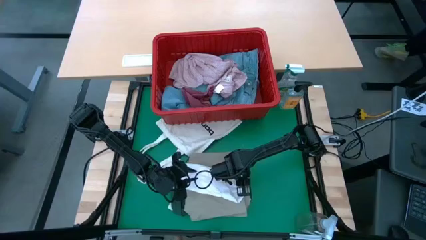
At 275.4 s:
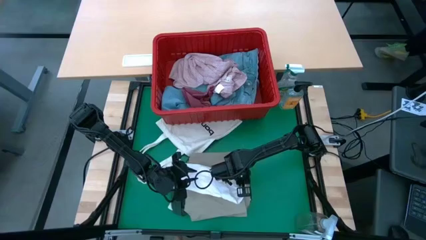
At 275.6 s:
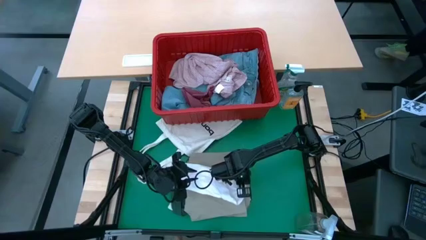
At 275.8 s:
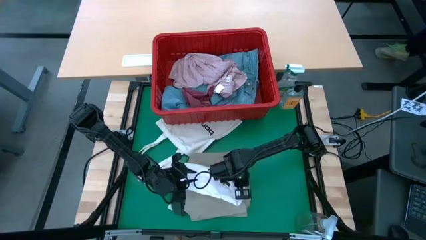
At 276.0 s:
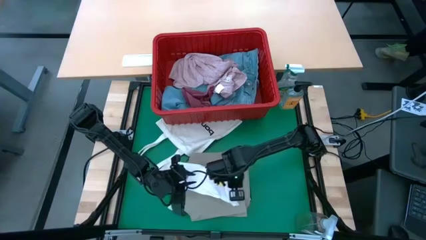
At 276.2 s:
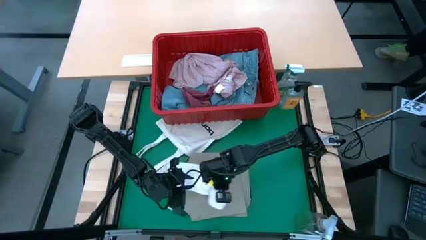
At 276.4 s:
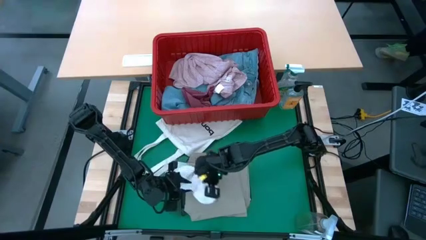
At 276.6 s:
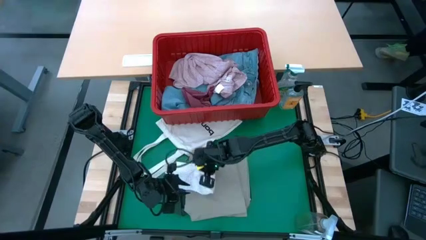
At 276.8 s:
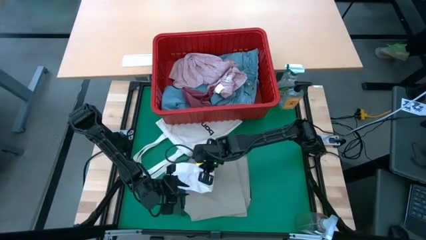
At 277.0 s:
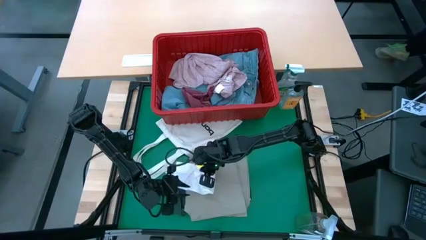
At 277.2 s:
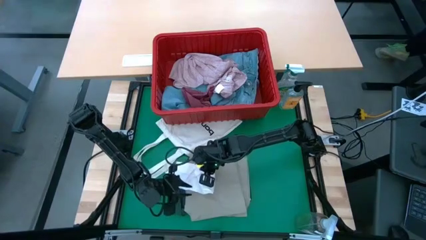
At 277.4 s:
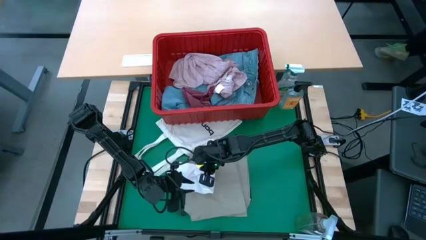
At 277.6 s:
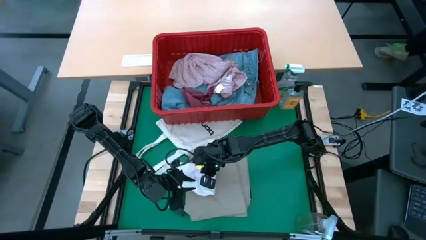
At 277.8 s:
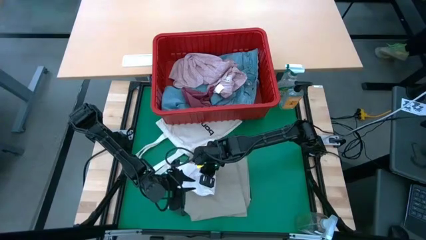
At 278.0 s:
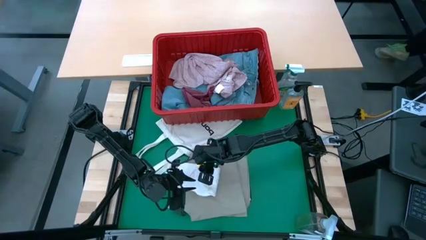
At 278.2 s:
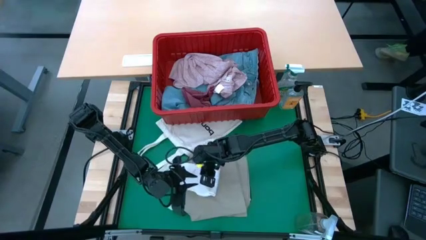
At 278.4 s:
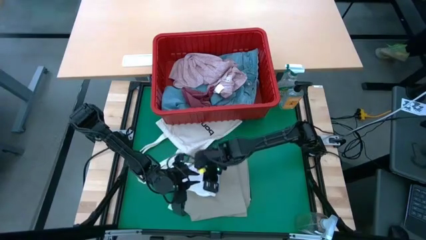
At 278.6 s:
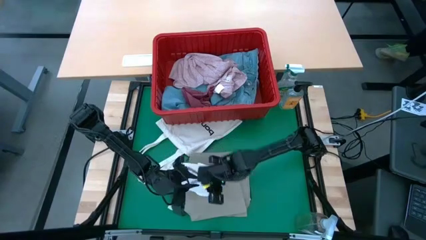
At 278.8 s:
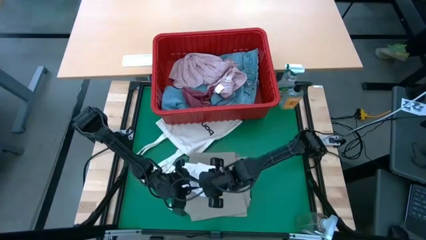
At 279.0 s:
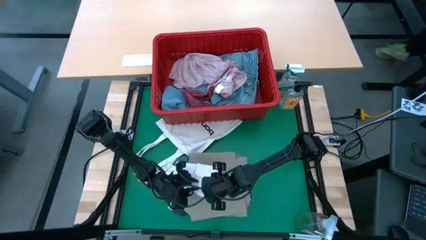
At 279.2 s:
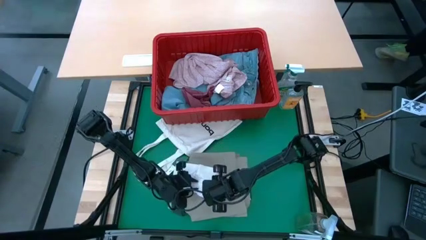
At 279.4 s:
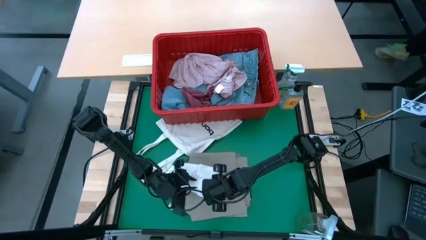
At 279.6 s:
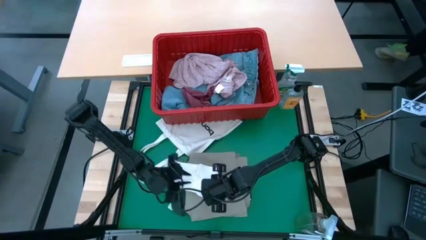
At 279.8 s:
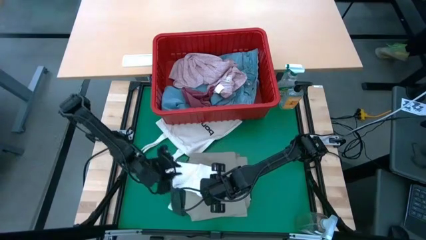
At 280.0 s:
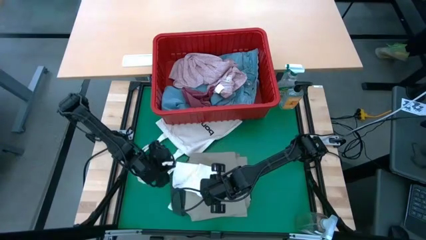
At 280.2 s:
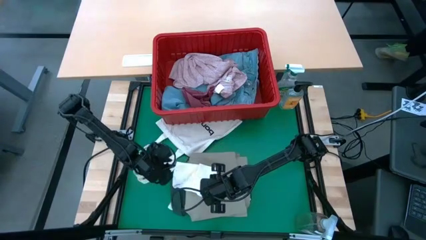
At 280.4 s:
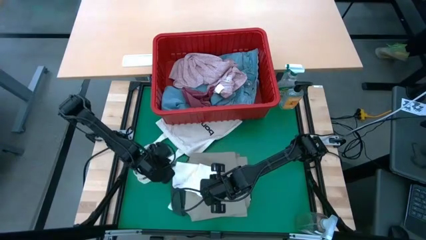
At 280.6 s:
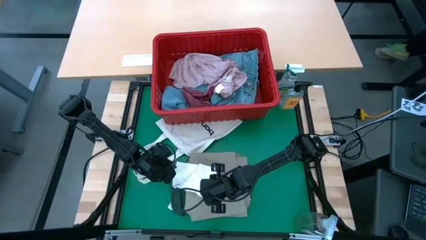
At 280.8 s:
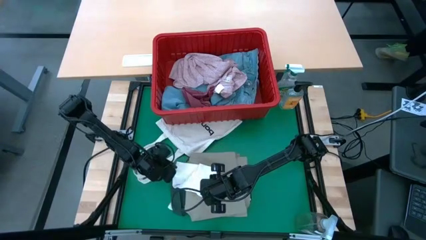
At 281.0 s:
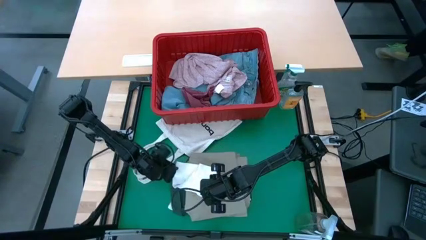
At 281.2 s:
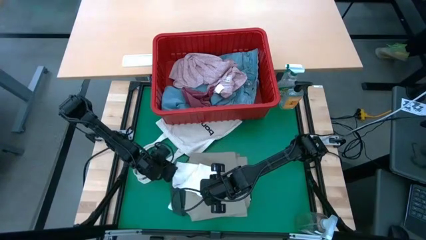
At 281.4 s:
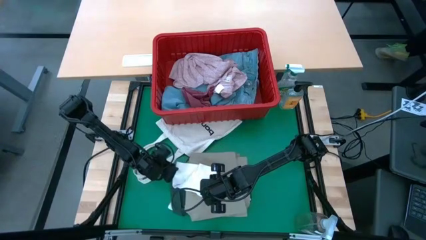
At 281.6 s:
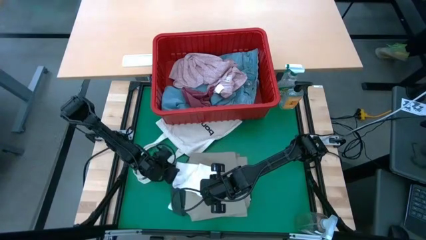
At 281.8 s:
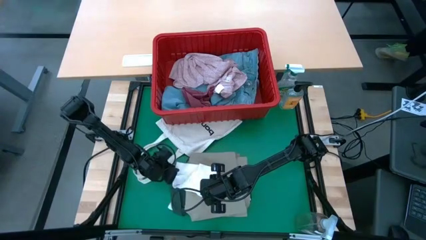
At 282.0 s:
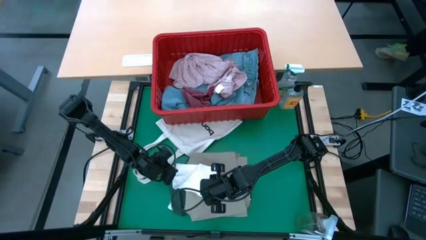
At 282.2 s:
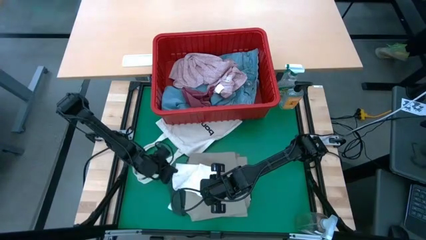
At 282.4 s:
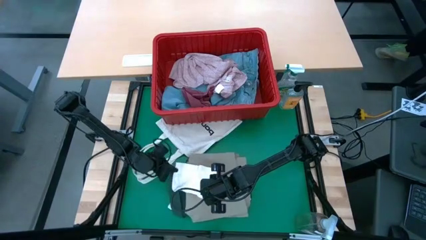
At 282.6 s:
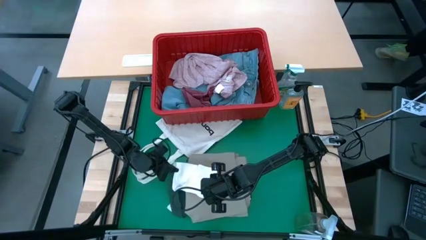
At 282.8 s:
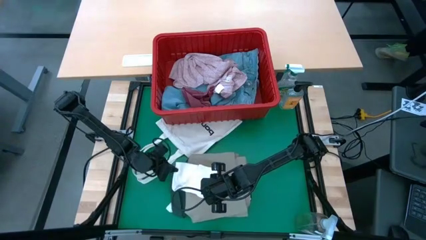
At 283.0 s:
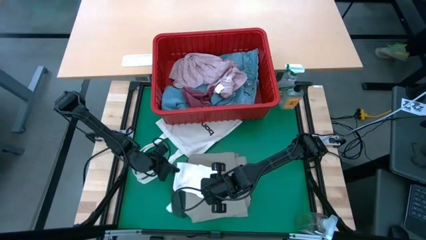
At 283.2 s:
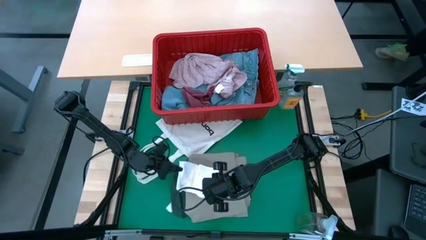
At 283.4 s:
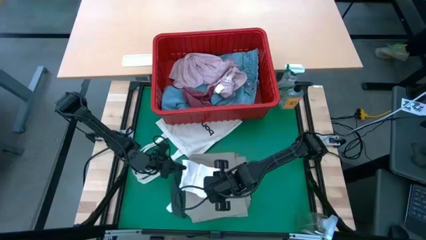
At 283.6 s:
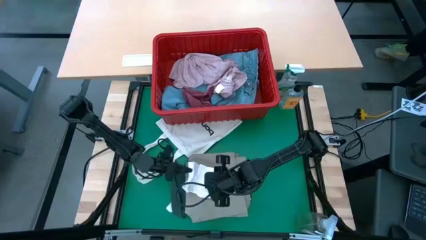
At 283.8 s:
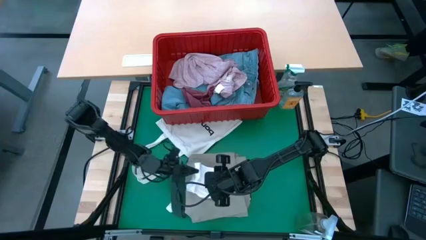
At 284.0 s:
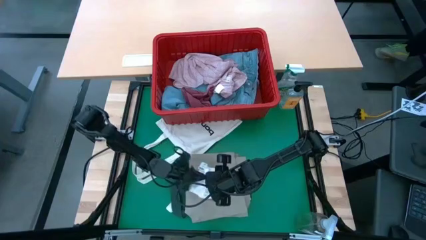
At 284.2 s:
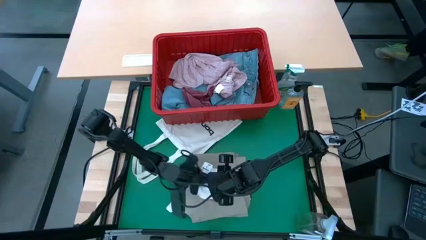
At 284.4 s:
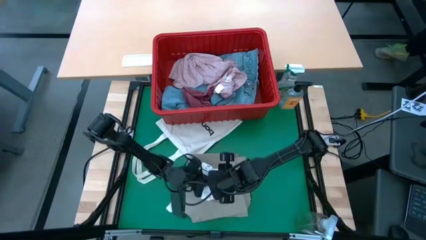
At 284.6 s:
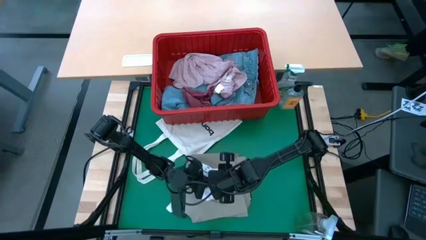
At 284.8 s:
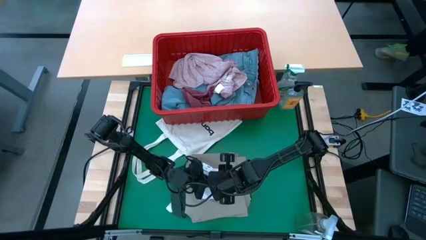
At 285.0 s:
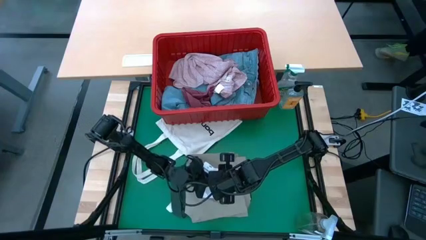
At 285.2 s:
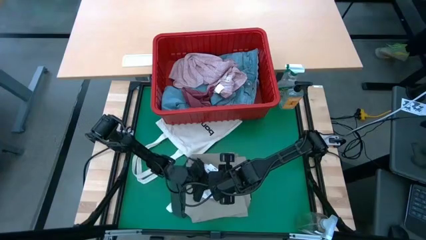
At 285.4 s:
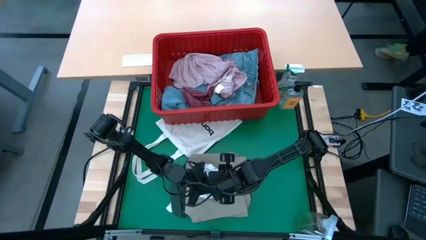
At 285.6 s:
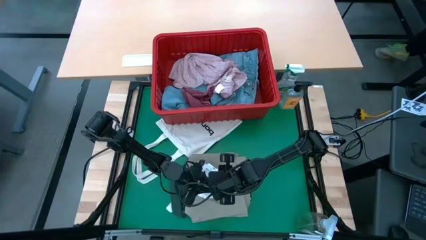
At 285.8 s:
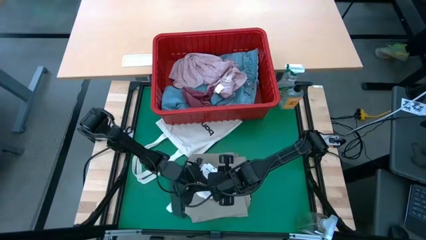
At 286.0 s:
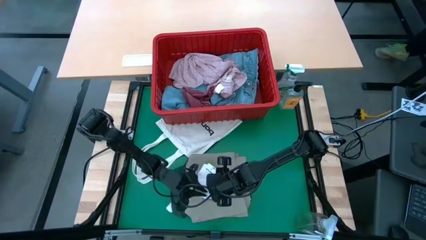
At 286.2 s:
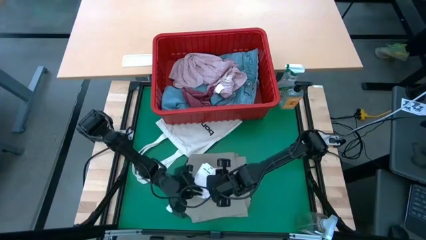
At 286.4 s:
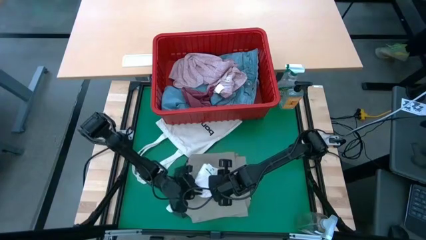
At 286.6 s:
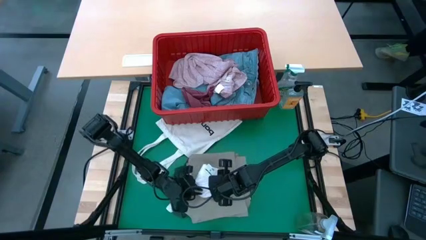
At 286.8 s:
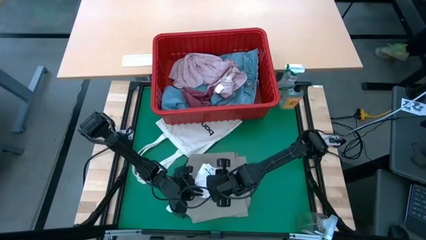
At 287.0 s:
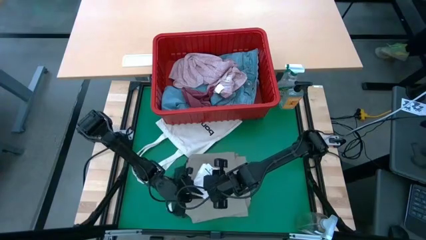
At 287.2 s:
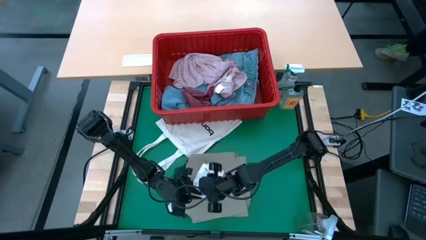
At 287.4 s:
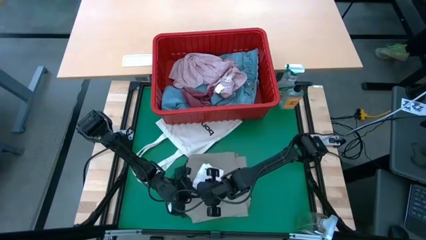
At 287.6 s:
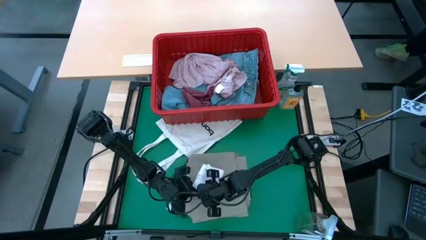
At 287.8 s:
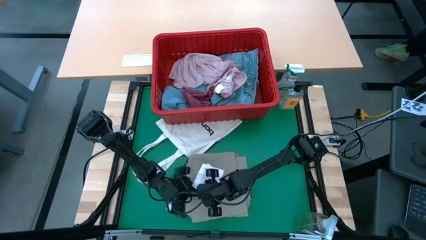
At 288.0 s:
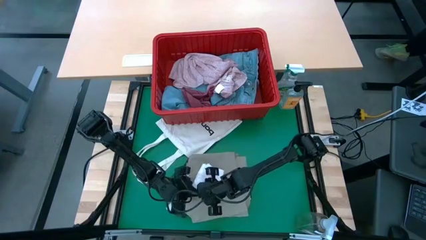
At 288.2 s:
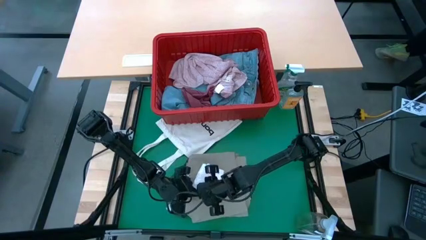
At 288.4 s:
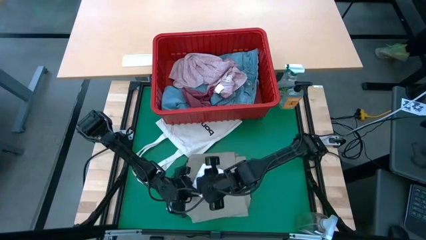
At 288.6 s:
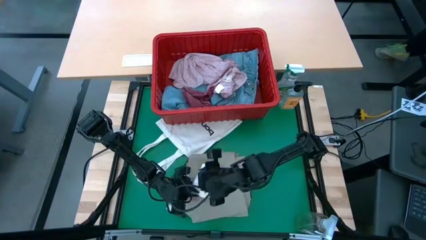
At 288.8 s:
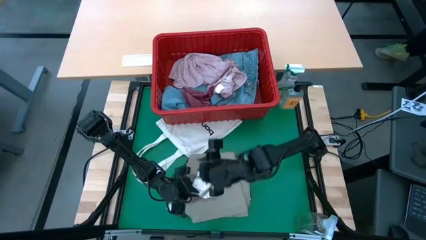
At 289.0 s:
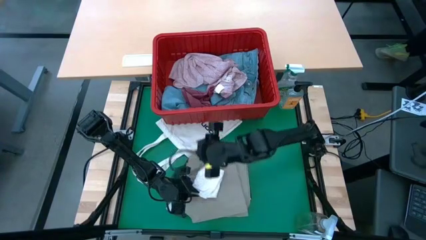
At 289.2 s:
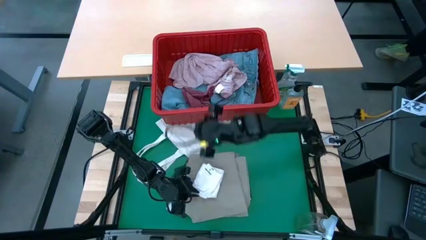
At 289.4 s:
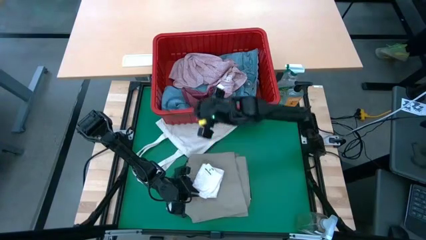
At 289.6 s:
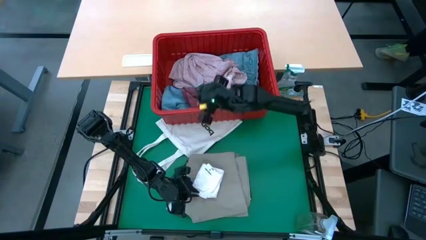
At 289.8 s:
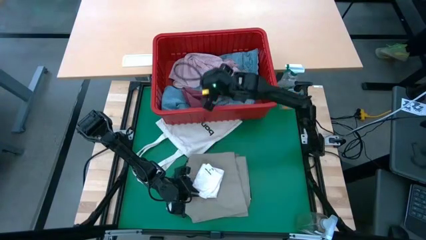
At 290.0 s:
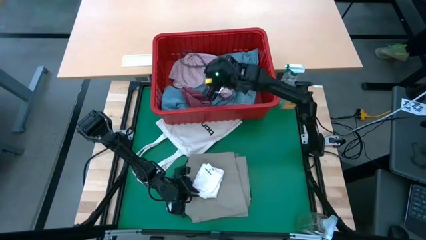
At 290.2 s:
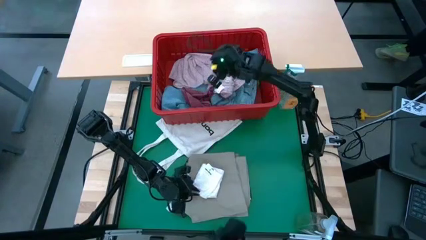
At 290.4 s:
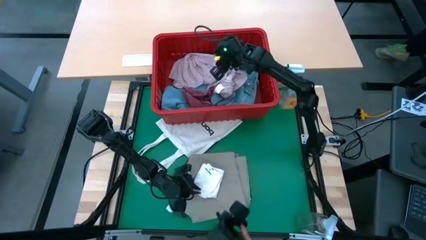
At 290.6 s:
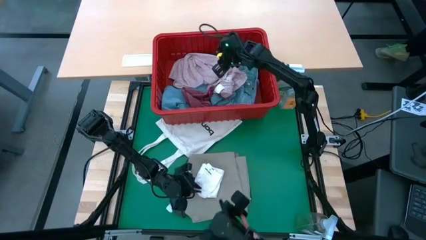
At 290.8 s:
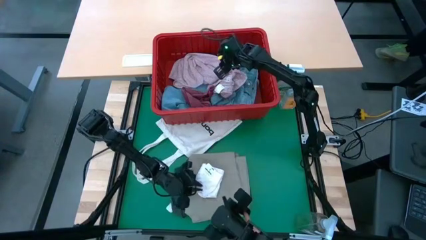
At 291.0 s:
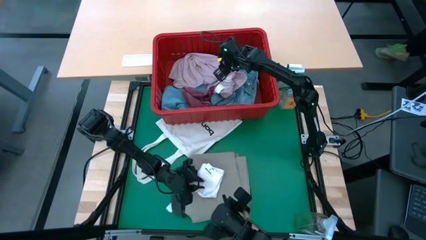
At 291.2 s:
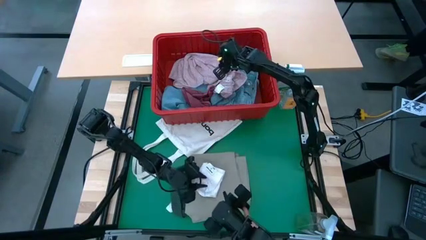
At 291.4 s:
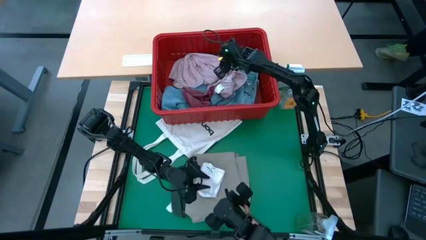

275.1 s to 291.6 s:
Task: Fold laundry
Fold the pink panty
